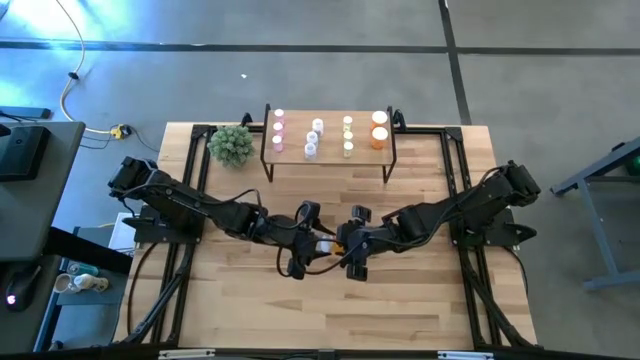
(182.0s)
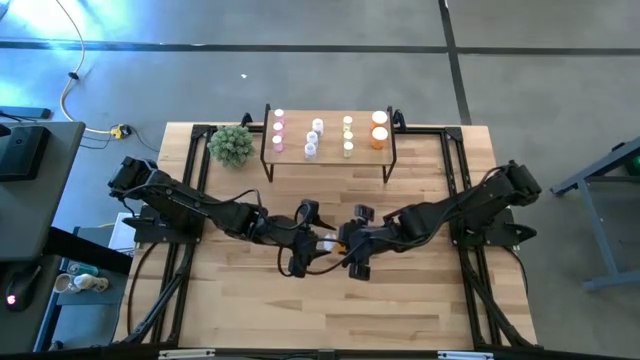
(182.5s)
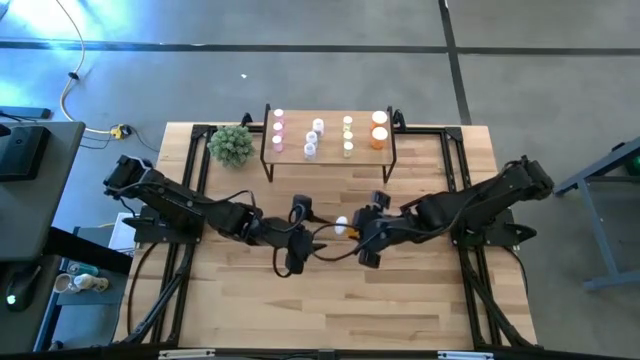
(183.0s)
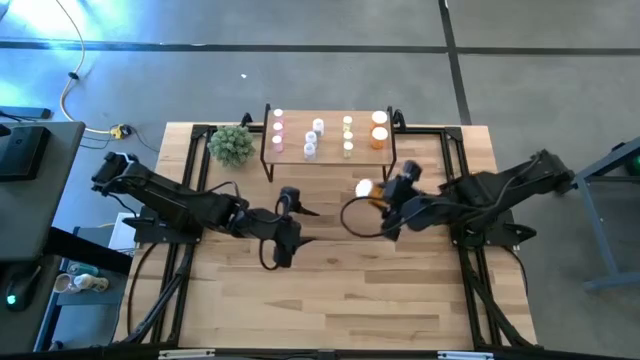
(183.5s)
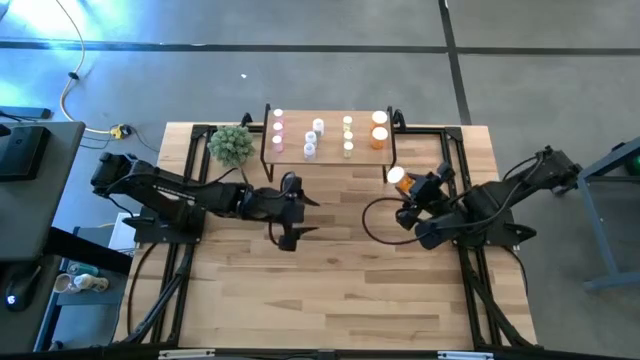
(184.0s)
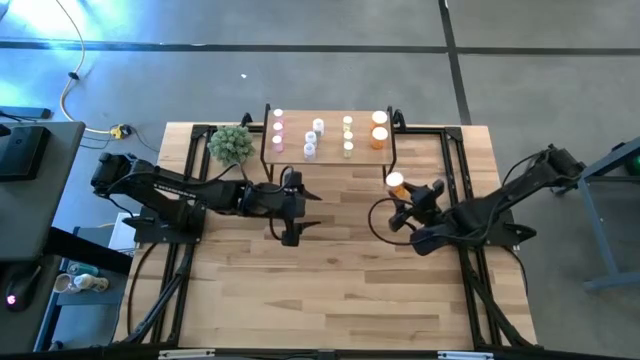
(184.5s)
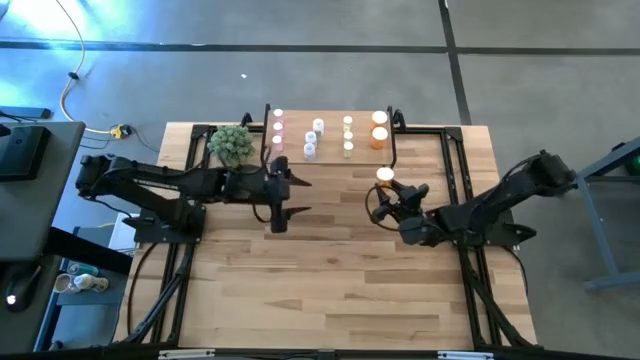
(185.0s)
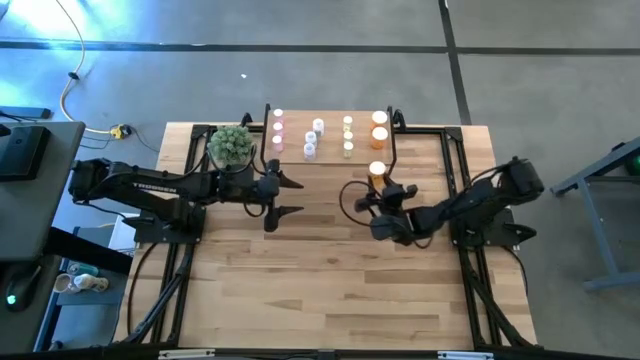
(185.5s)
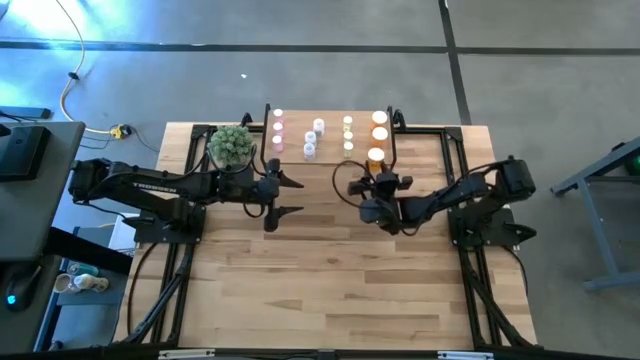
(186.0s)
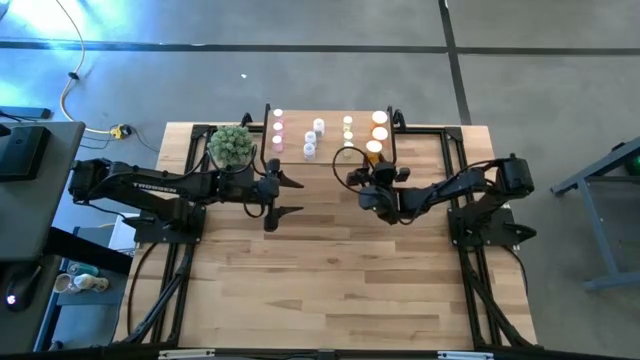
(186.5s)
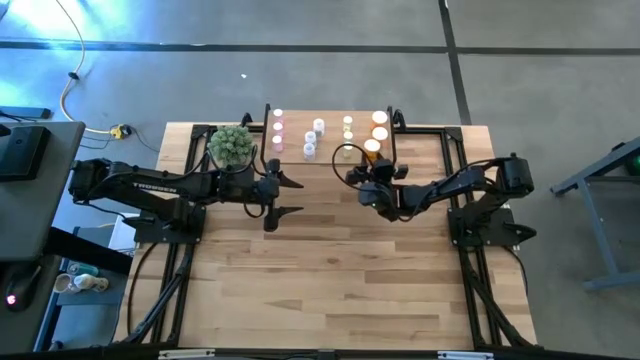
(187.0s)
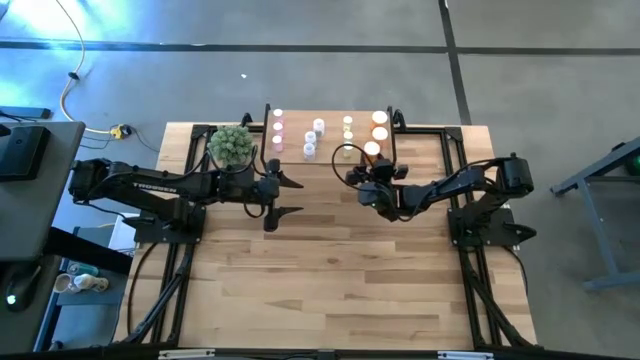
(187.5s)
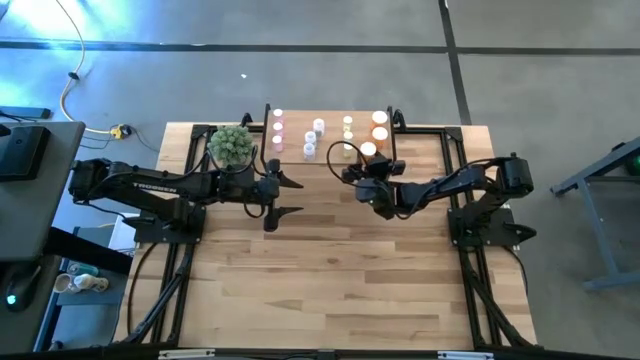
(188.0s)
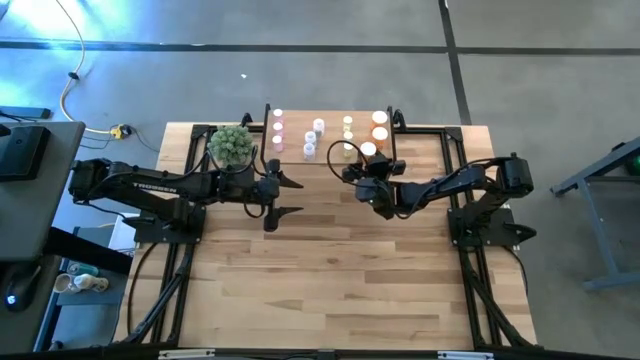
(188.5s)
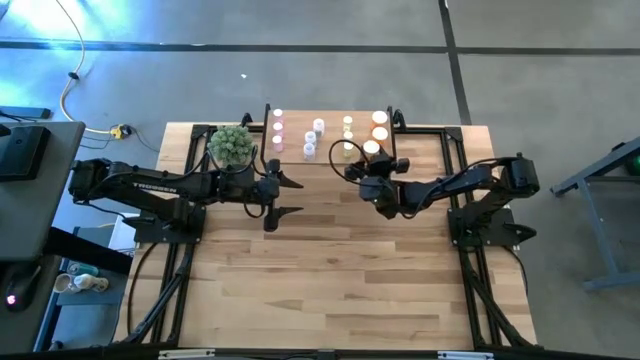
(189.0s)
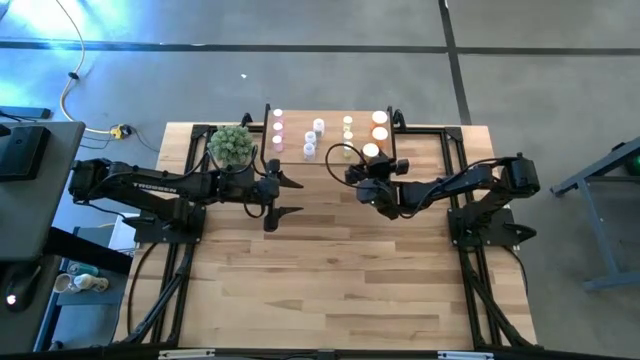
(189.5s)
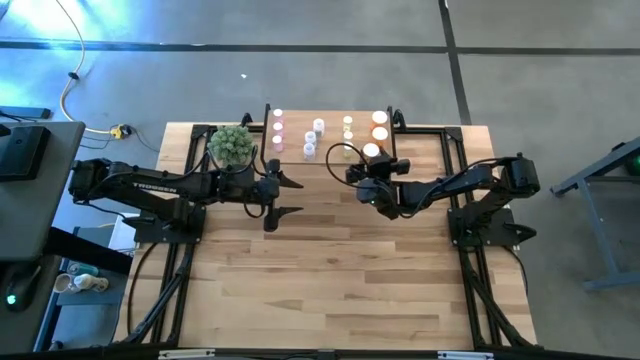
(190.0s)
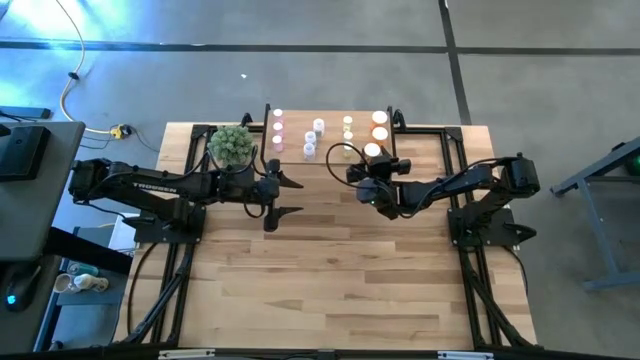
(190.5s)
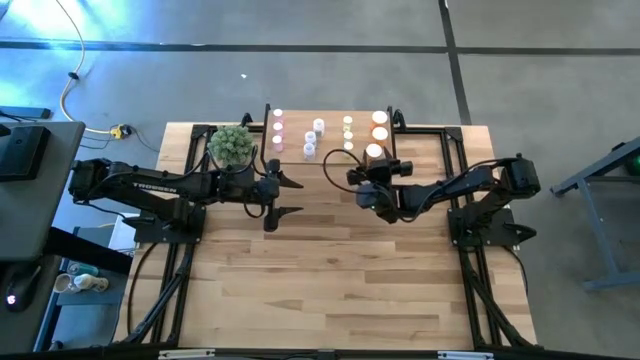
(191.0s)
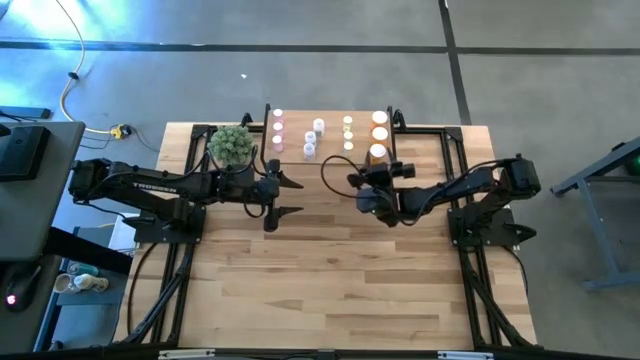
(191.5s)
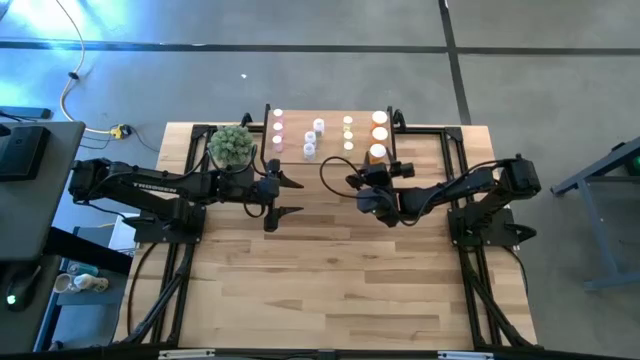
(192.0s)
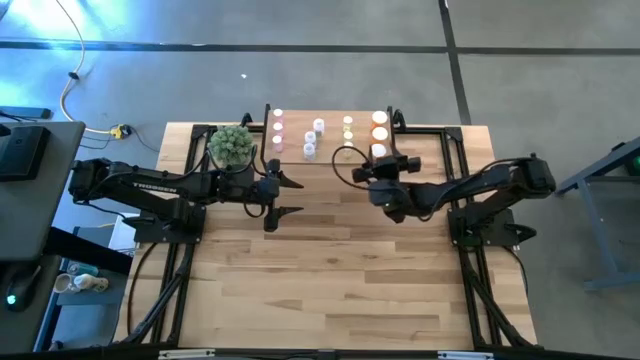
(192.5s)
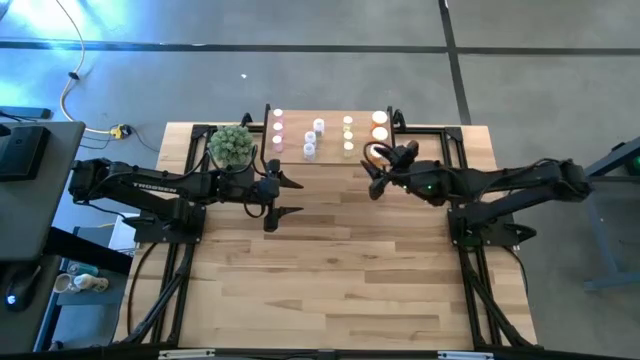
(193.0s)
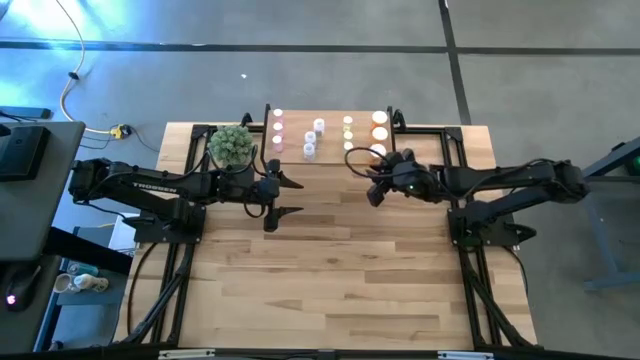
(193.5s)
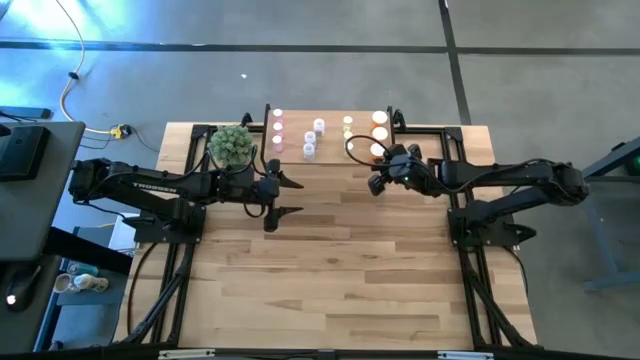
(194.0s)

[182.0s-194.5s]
Task: Pick and place medicine bottles onto shelf by color
Put the orange pill bottle on the shelf aligned with the other orange pill bottles

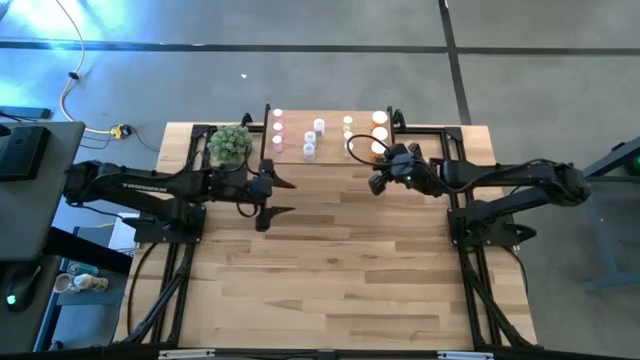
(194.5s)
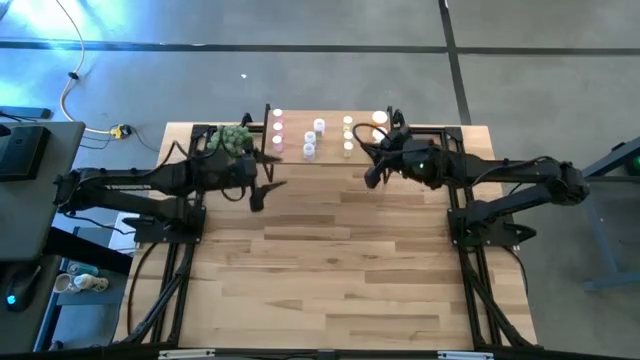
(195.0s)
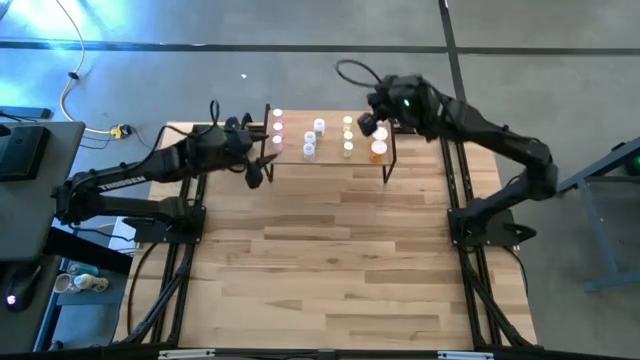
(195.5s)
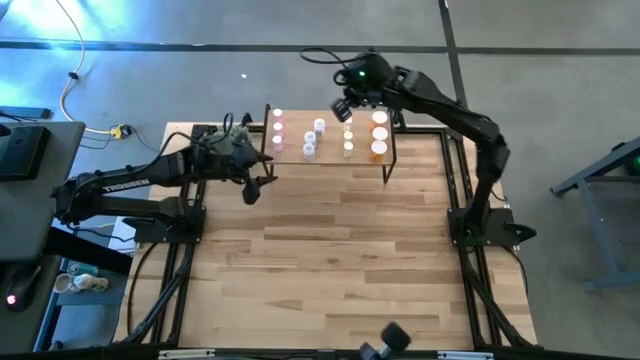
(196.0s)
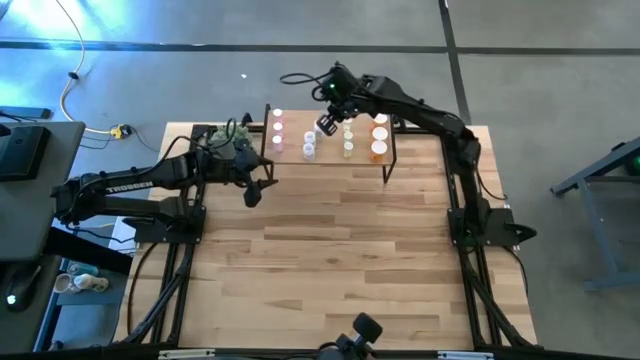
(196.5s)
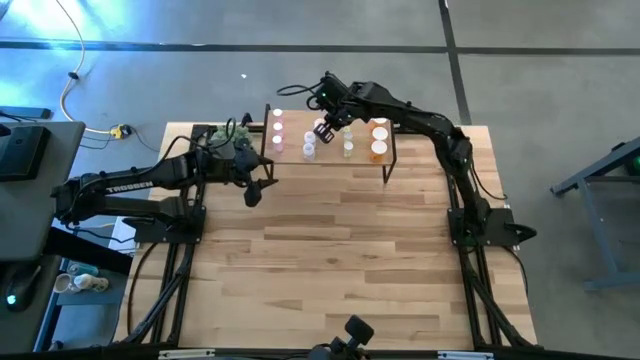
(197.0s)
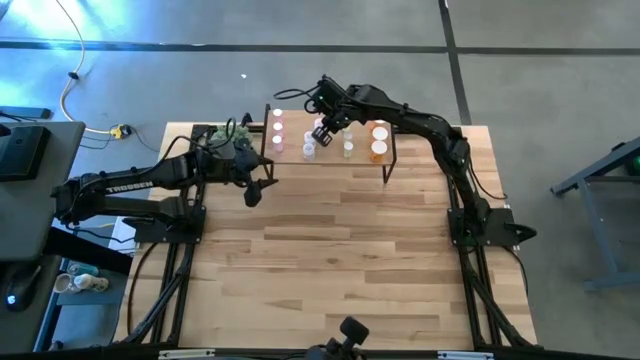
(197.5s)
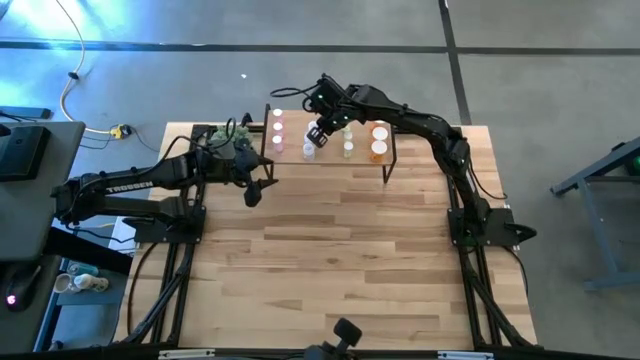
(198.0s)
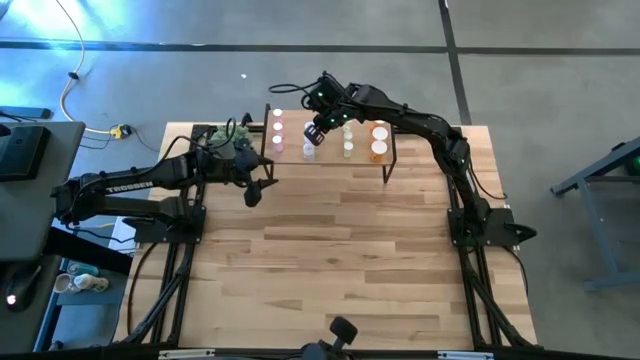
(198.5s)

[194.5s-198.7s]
Adjust the transparent pill bottle on the shelf

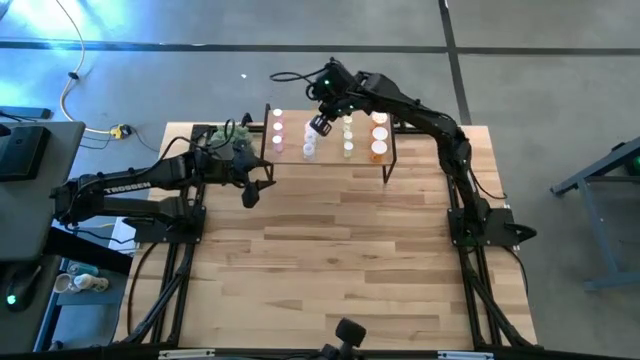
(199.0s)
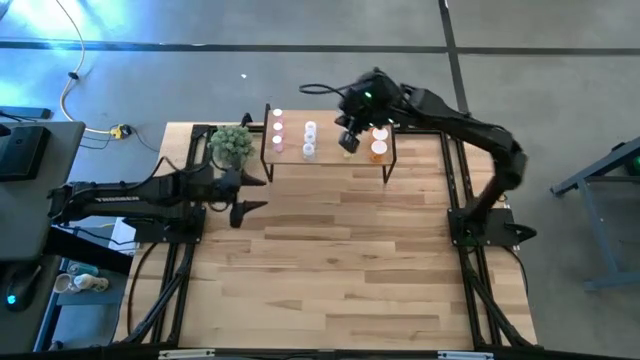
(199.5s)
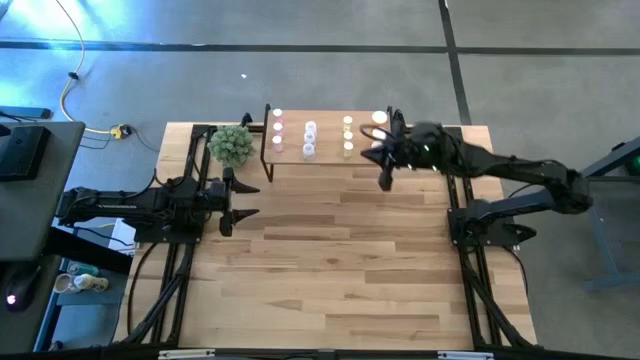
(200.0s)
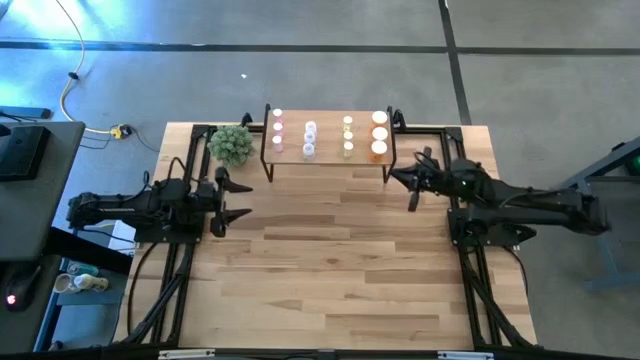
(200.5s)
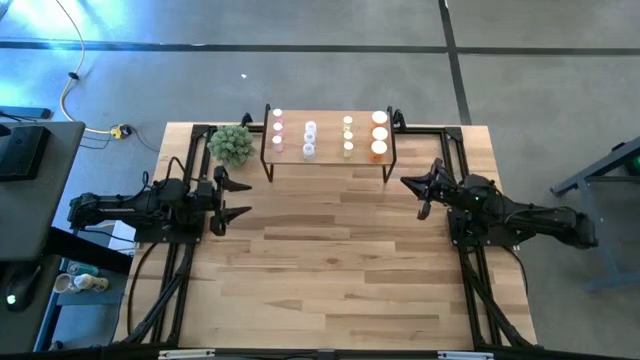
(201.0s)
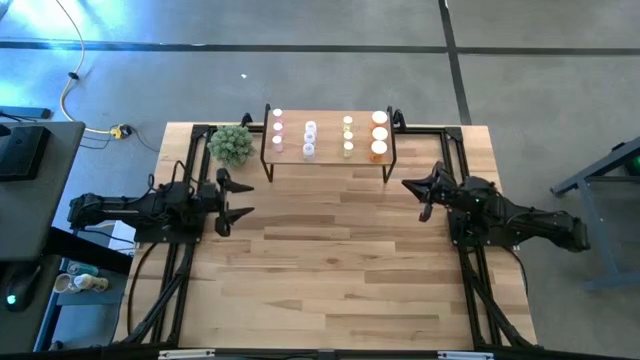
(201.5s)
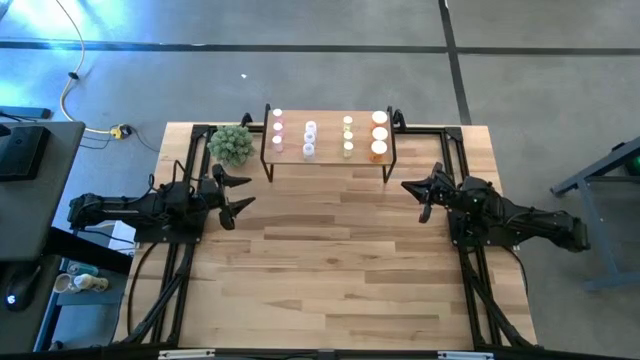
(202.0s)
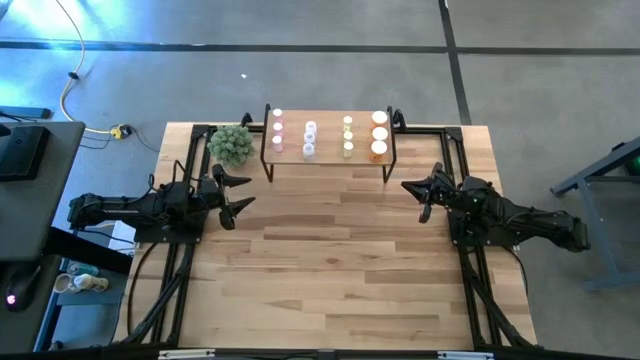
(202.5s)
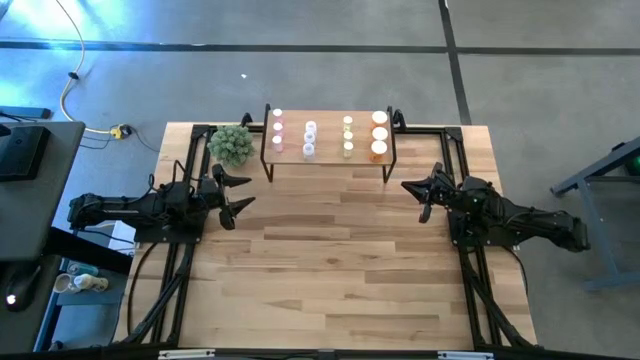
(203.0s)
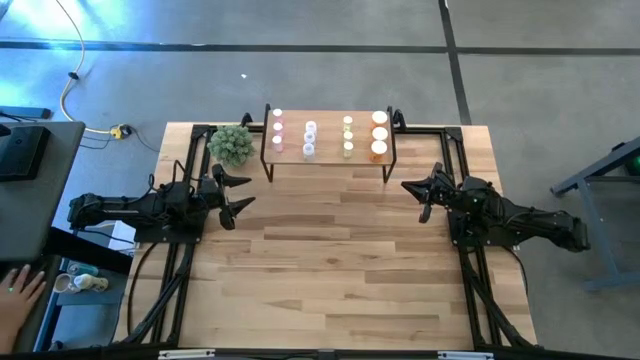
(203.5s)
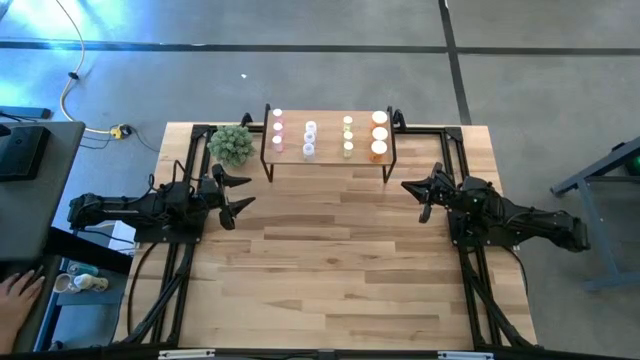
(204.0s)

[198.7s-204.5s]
Return to Home Position

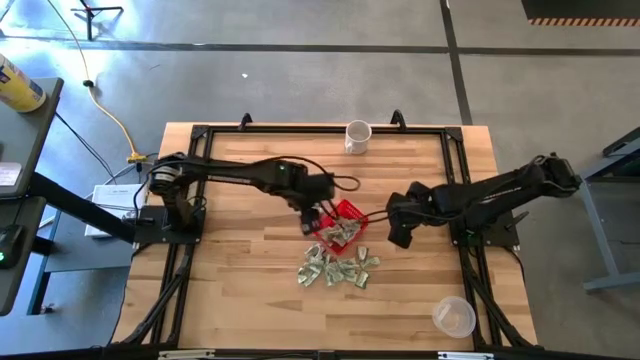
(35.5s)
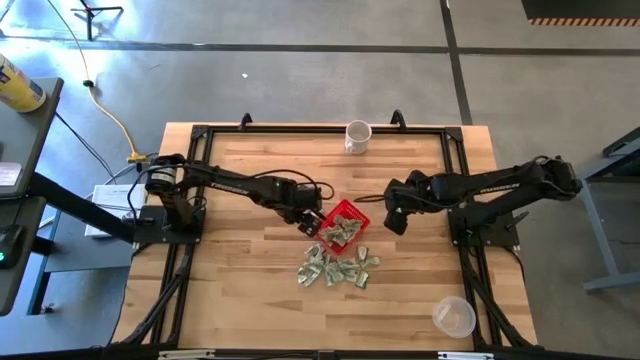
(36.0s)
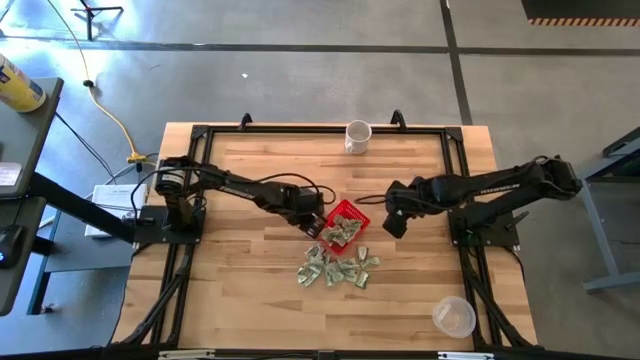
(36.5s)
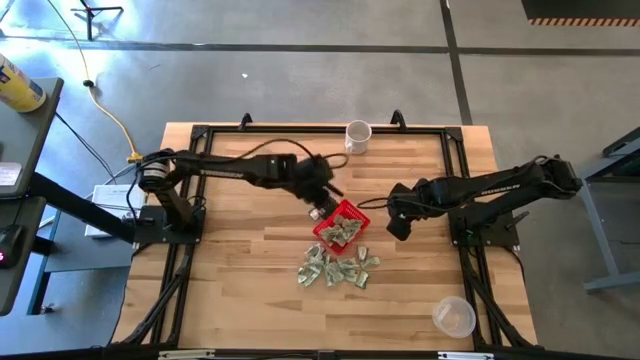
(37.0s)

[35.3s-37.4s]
Task: Pick and place items into bin
Put the white stevia packet into the red bin
